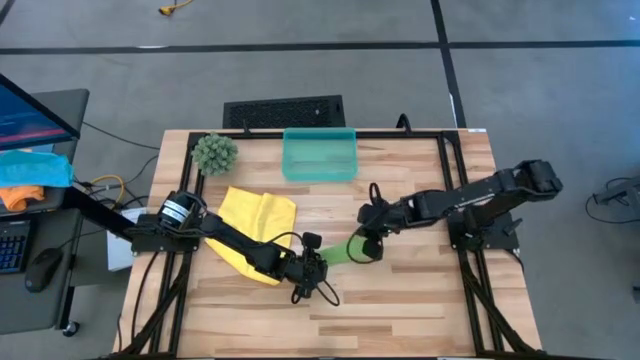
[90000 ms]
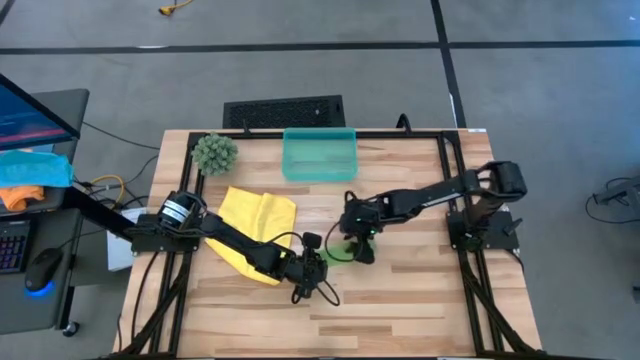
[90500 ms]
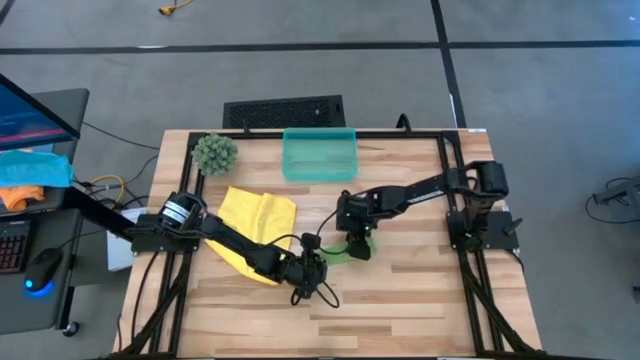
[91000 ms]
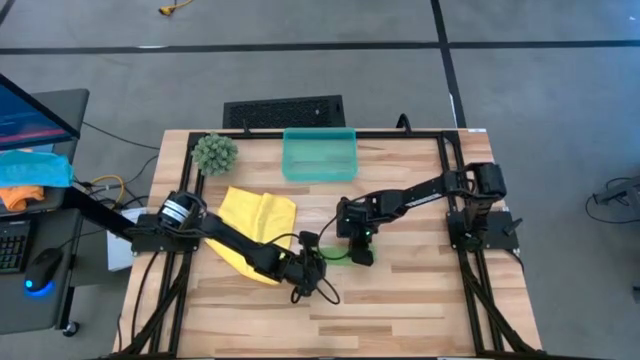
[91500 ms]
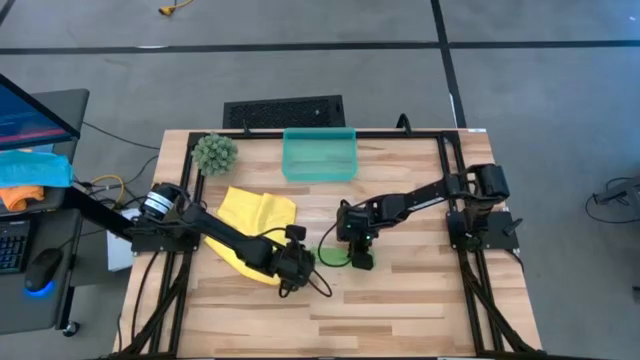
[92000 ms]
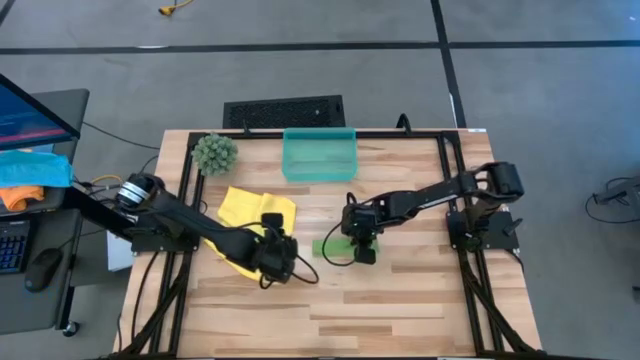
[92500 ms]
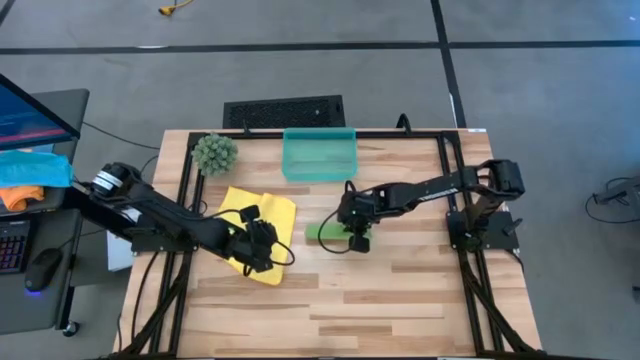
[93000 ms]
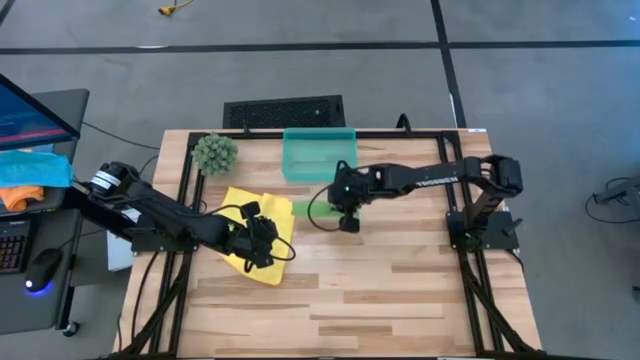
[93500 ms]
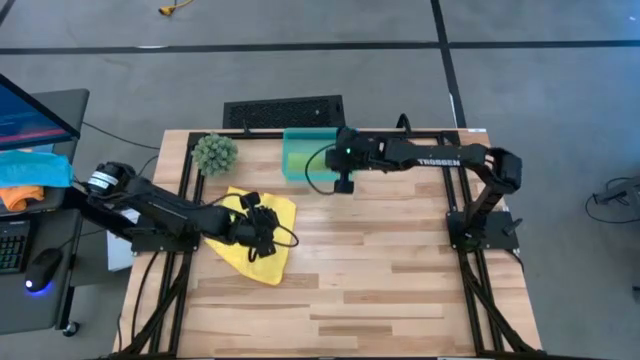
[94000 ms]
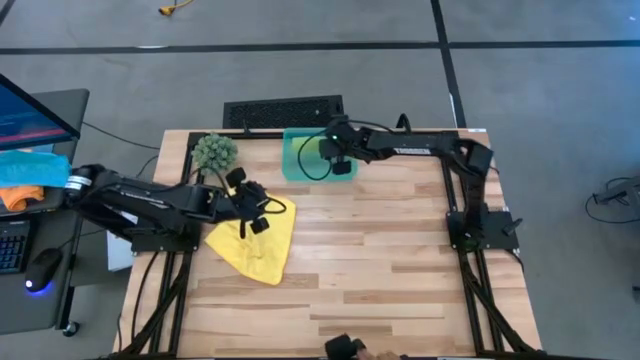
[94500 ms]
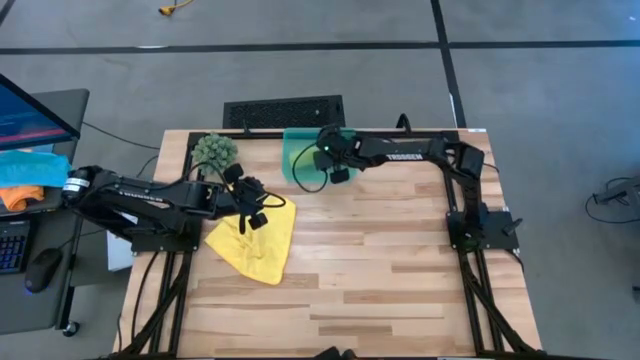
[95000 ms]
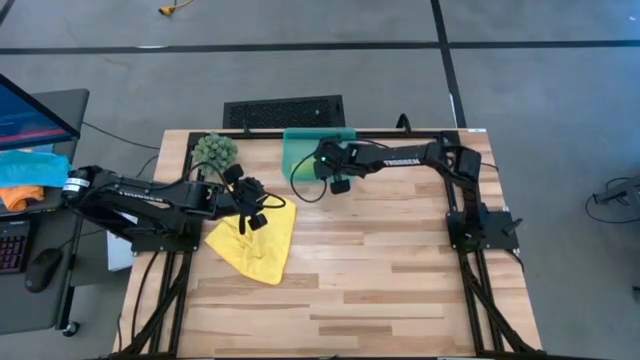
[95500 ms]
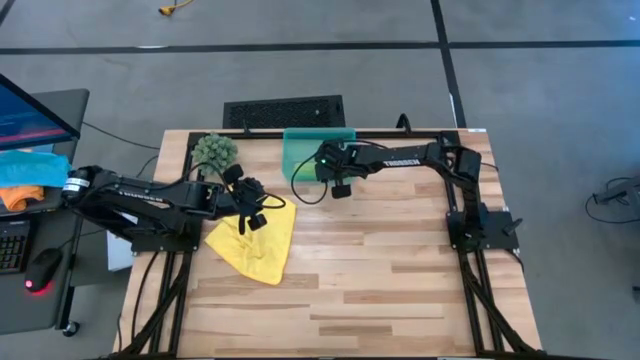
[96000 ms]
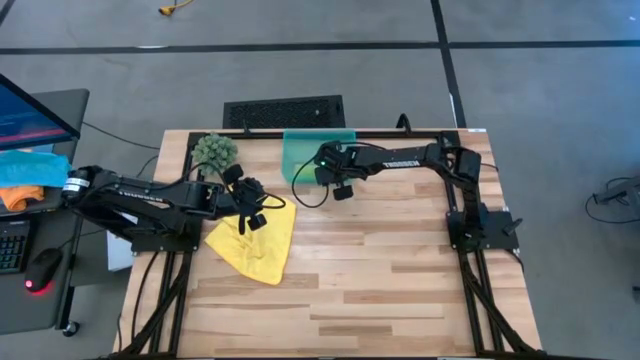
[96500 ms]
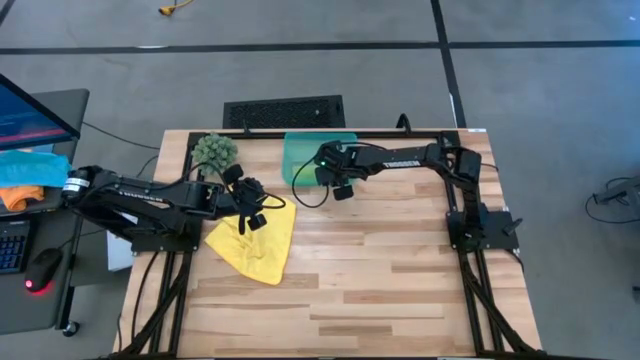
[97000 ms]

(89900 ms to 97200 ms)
Task: Roll microfiber towels into tight, uniform cylinder then place into a basket
Put the green microfiber cloth into the blue bin

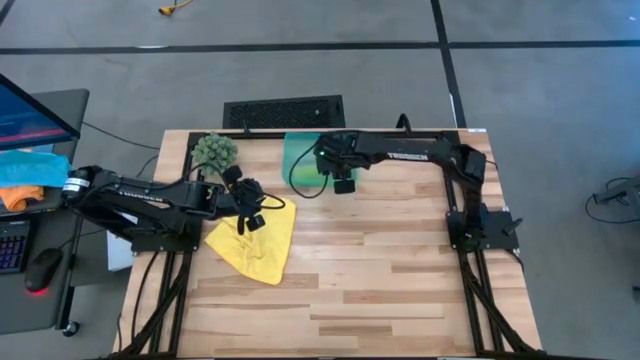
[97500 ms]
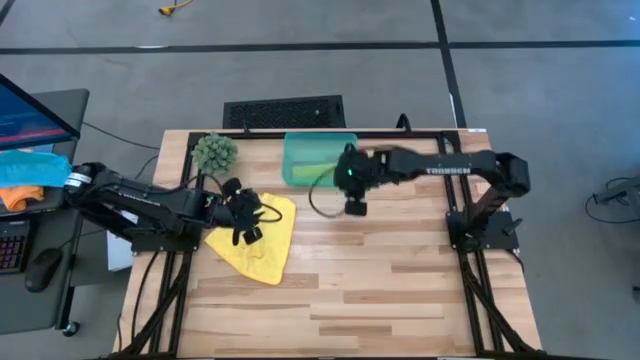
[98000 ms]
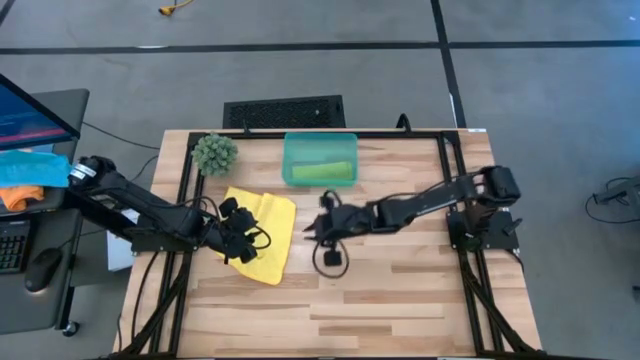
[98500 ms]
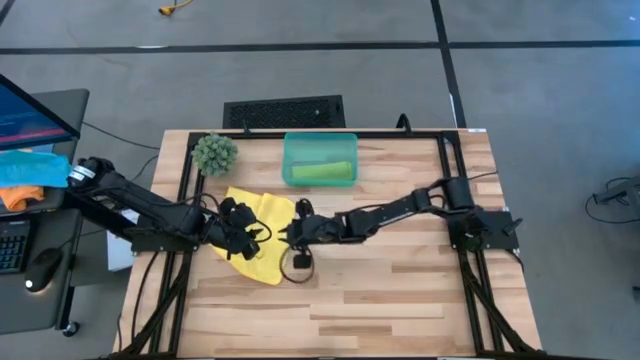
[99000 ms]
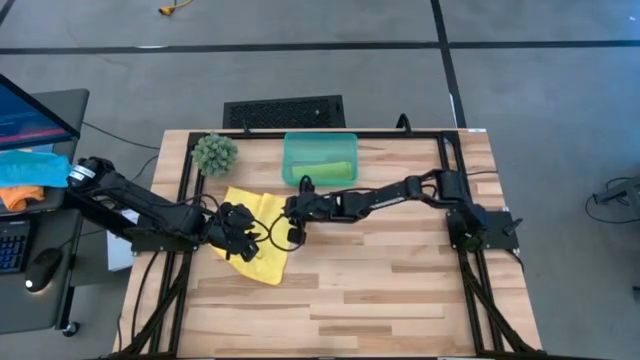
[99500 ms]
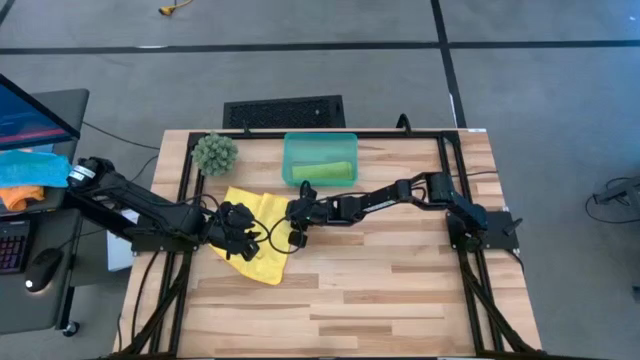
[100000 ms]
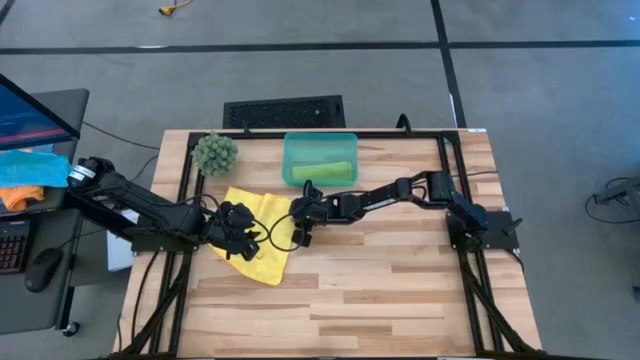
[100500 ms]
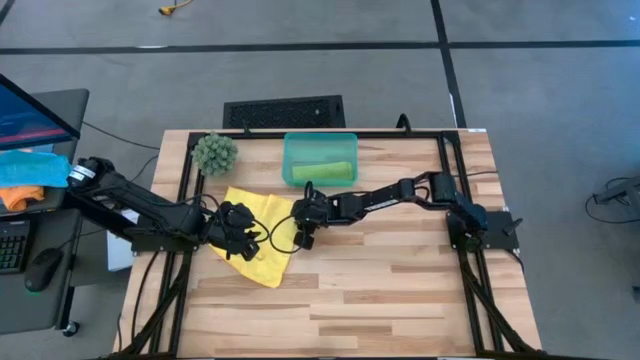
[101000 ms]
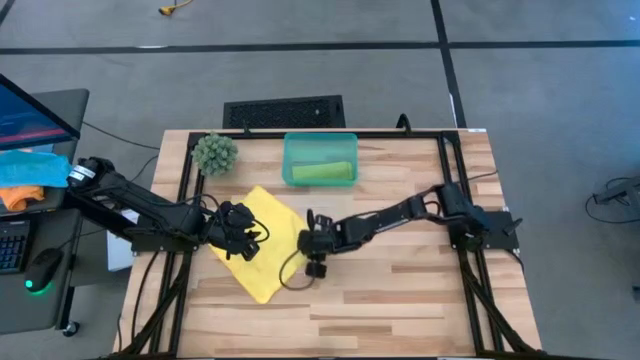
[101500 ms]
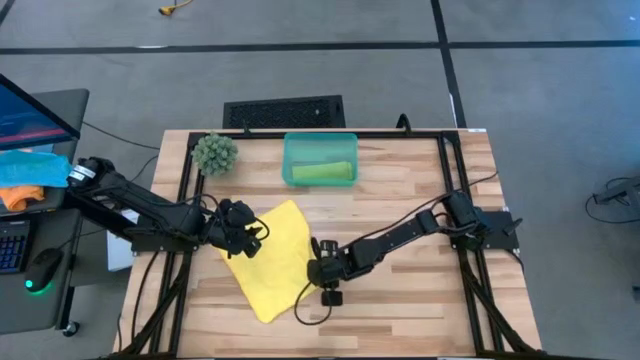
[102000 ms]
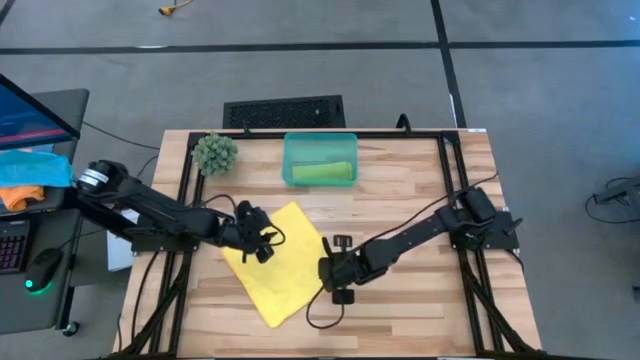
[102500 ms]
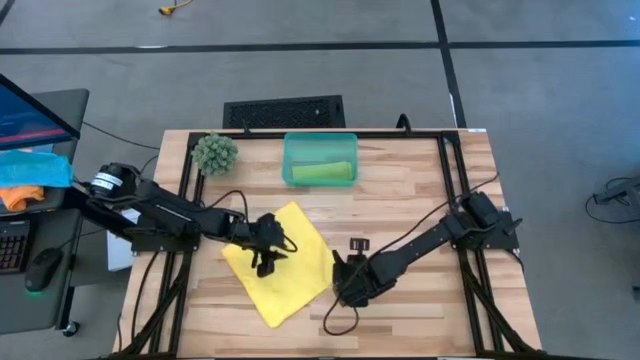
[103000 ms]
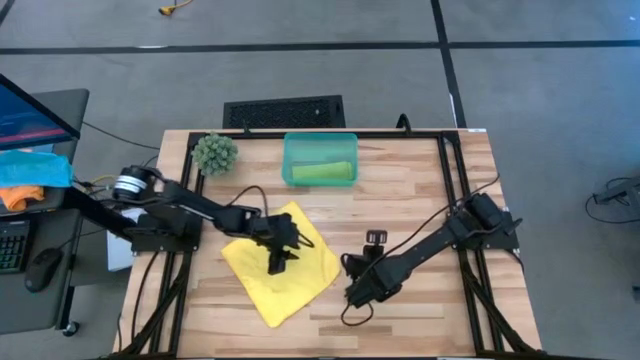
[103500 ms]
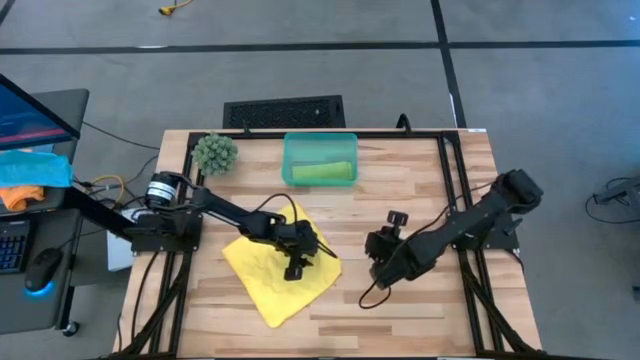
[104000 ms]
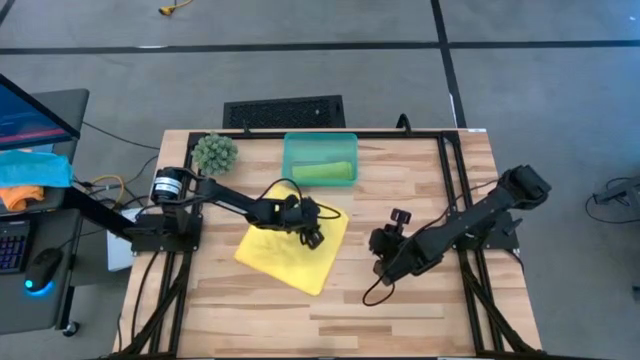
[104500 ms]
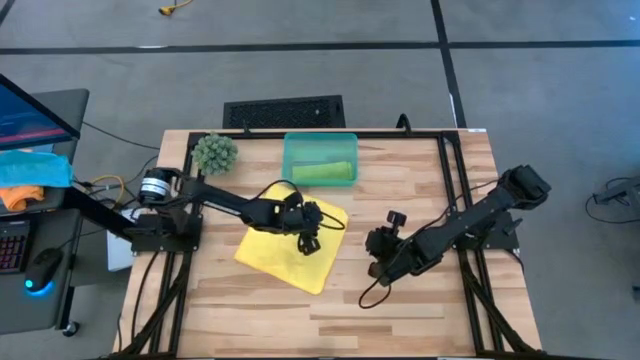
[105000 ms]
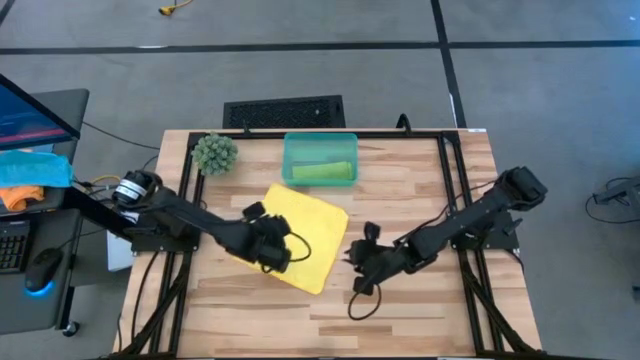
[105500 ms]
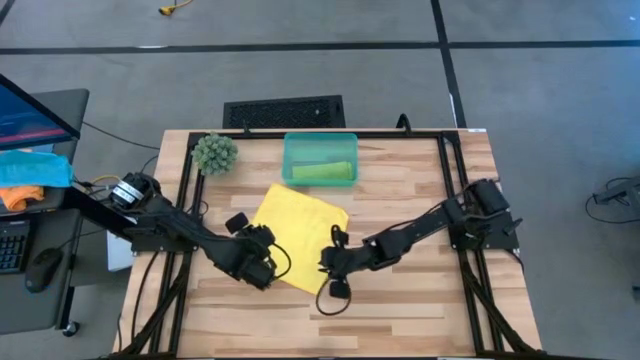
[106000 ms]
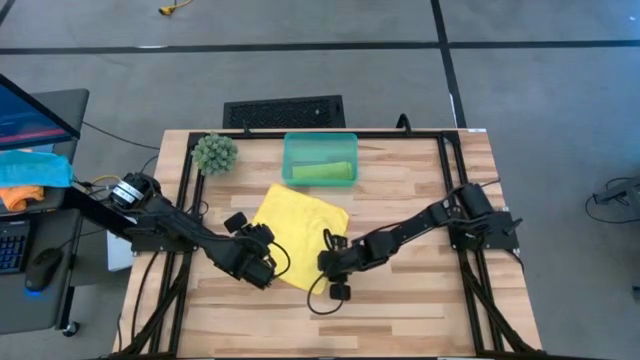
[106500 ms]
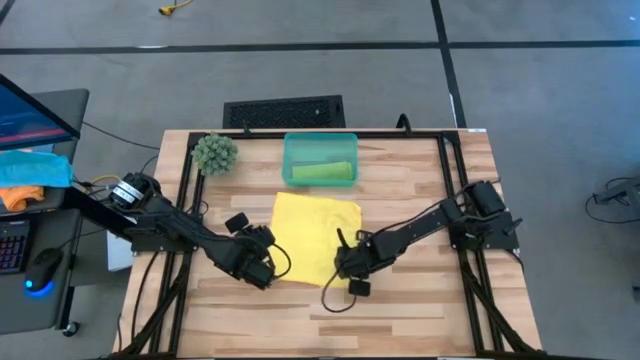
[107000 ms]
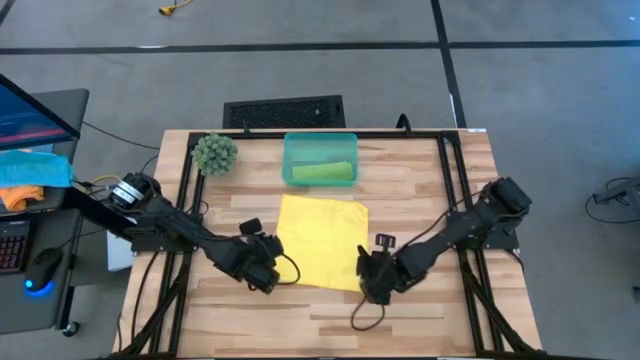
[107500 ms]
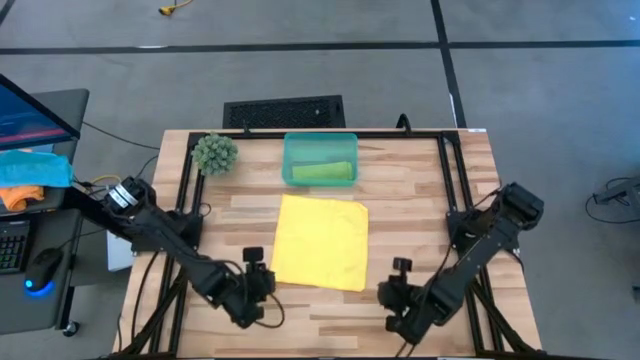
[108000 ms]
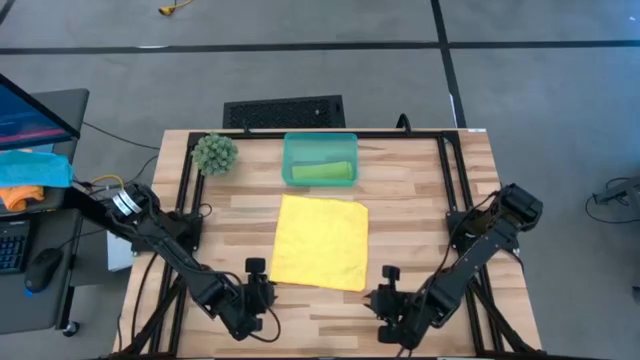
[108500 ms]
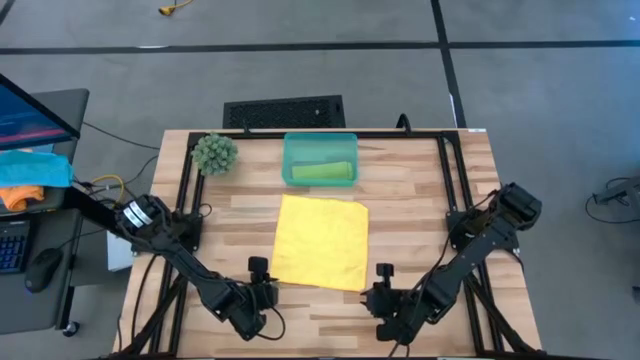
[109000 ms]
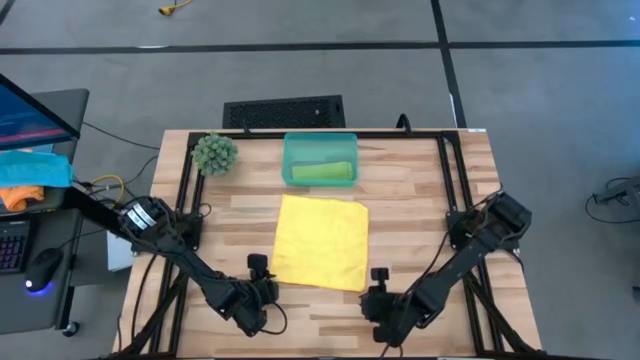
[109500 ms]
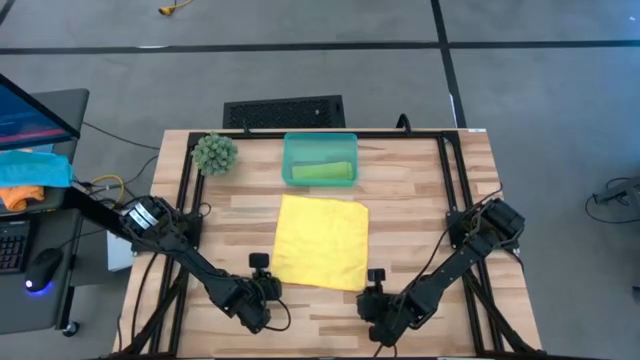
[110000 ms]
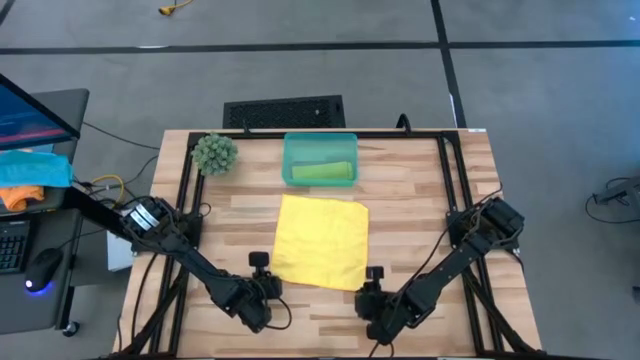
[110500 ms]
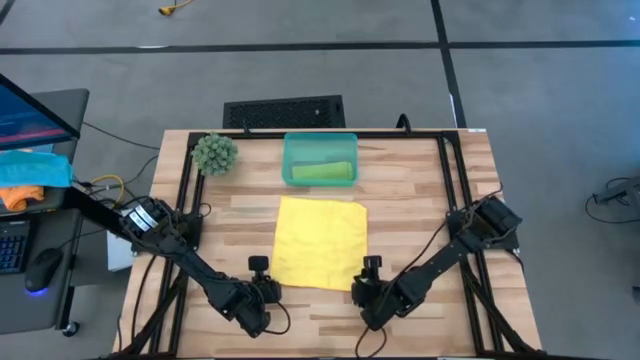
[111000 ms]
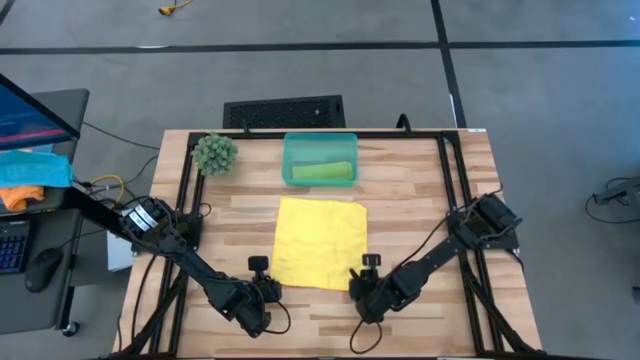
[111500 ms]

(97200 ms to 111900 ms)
Fold the yellow microfiber cloth
